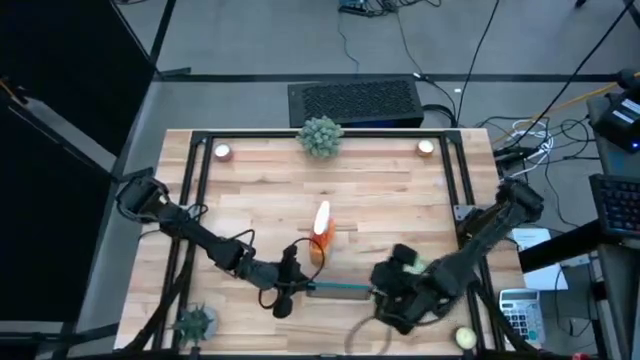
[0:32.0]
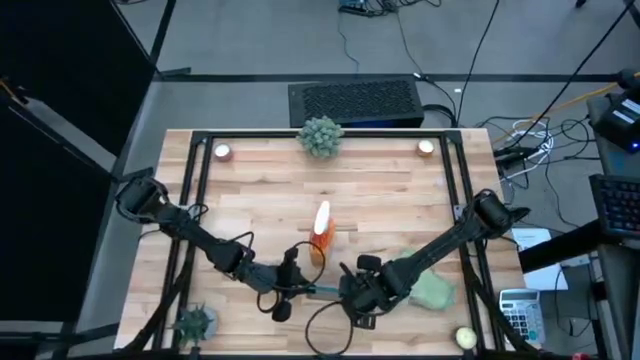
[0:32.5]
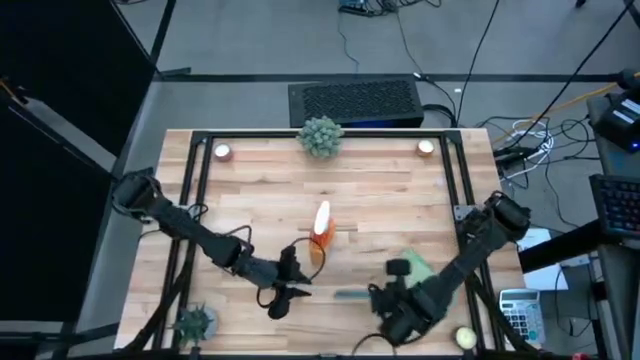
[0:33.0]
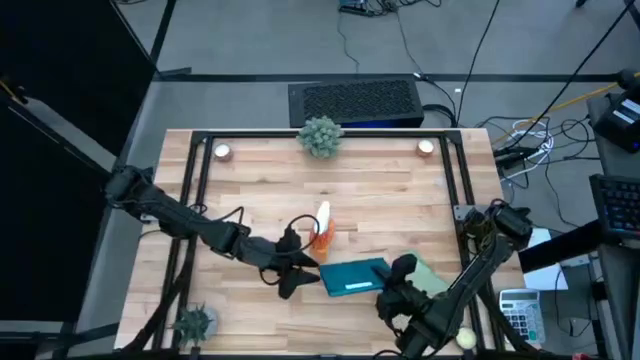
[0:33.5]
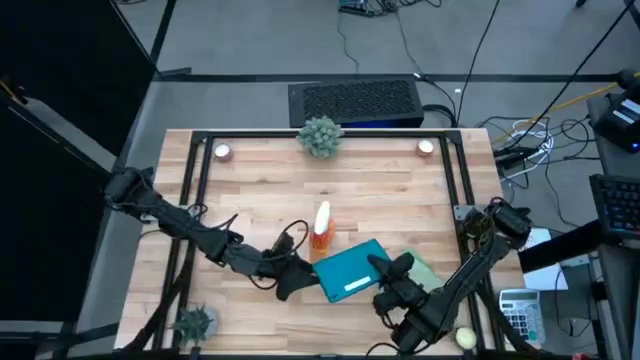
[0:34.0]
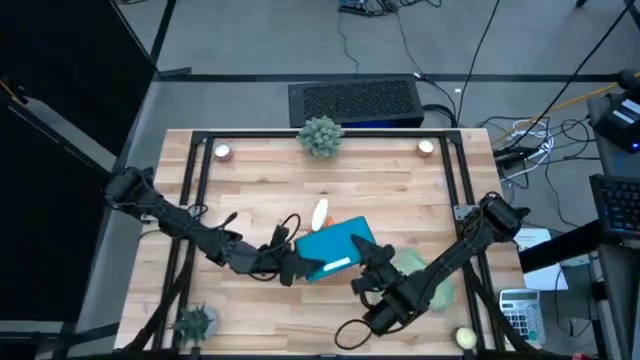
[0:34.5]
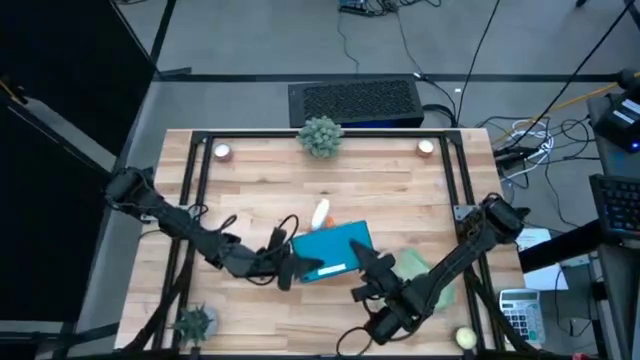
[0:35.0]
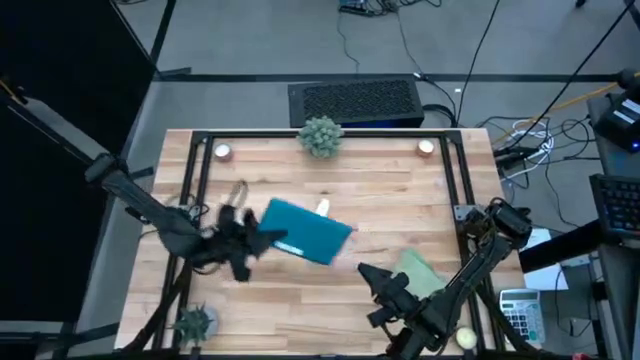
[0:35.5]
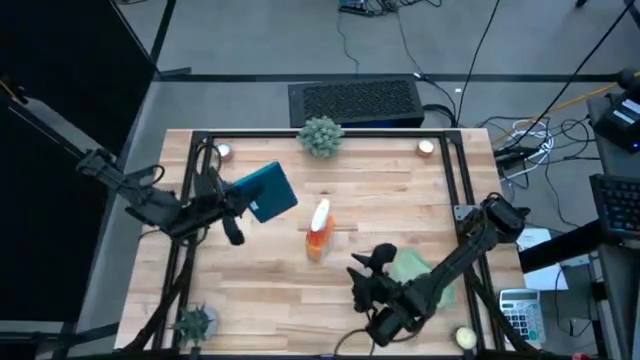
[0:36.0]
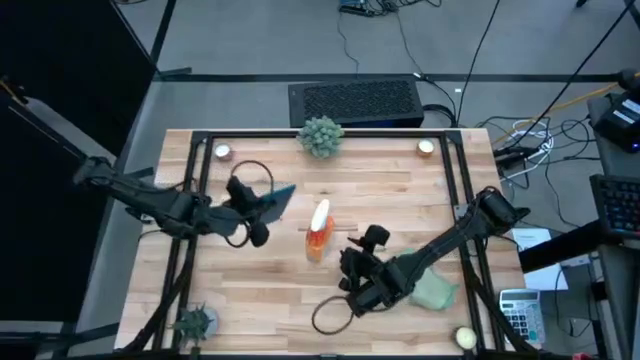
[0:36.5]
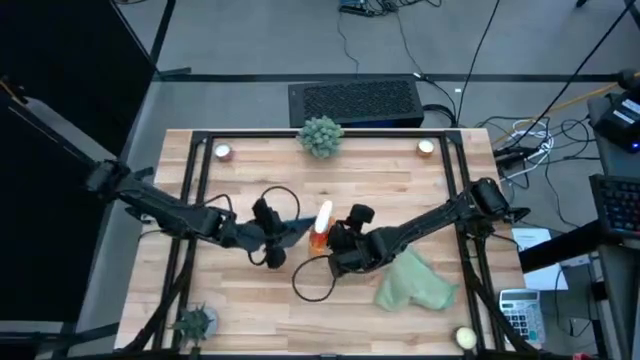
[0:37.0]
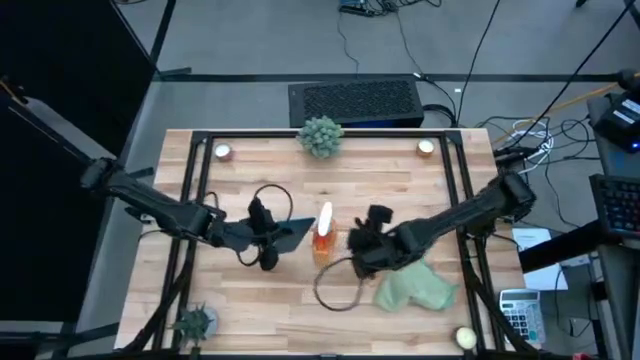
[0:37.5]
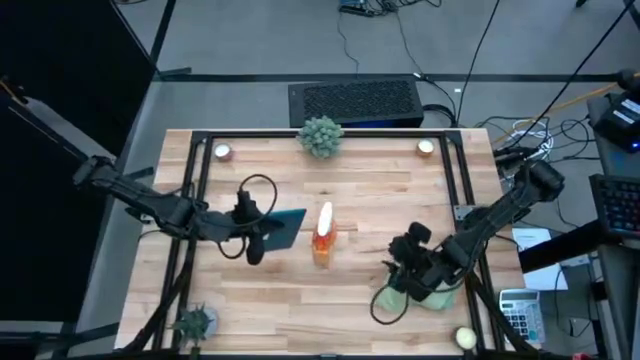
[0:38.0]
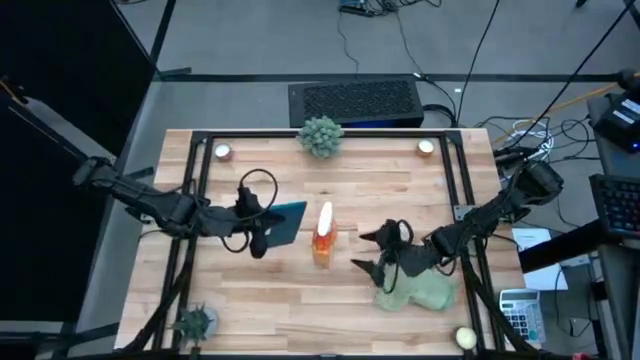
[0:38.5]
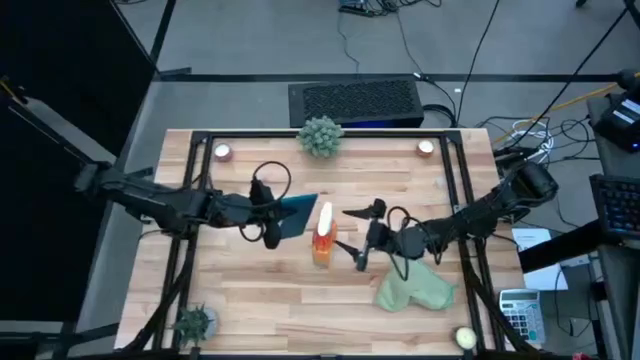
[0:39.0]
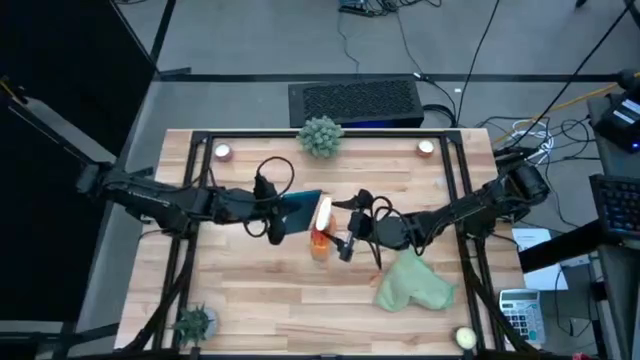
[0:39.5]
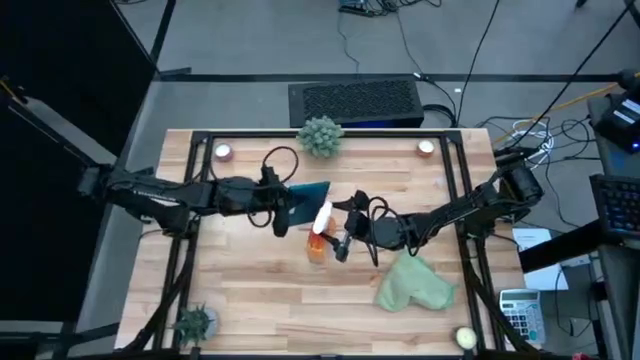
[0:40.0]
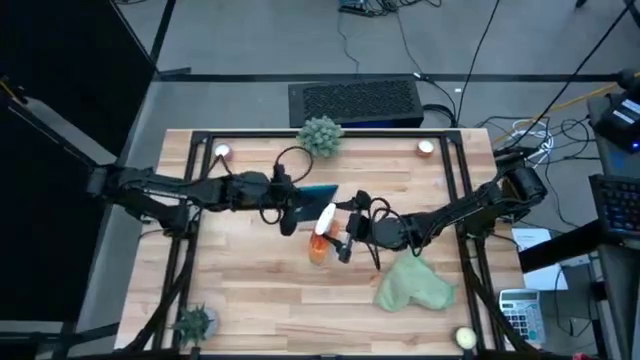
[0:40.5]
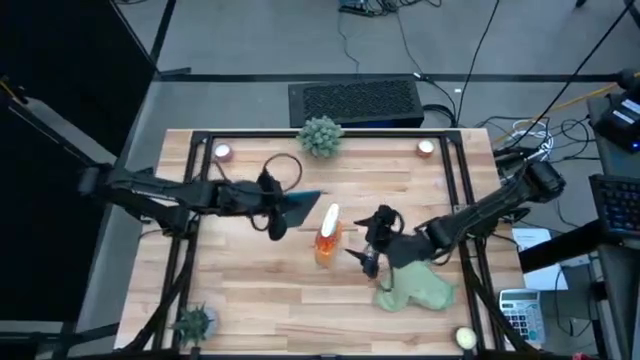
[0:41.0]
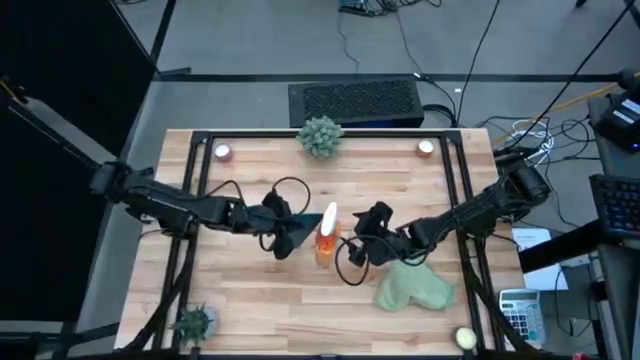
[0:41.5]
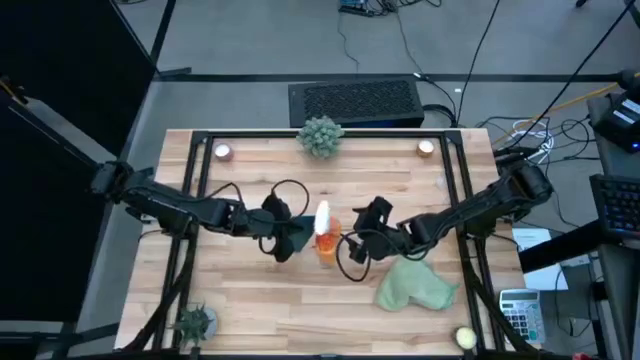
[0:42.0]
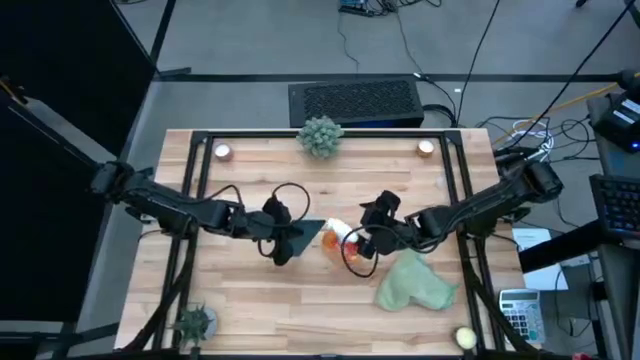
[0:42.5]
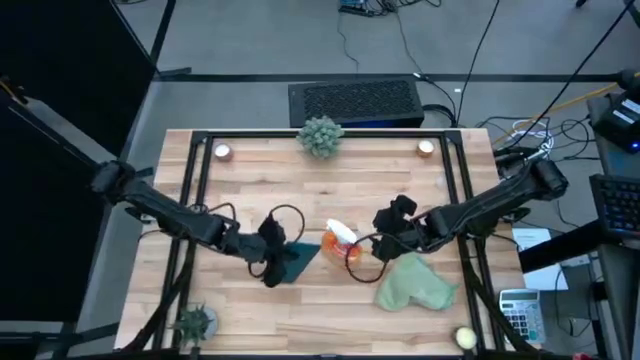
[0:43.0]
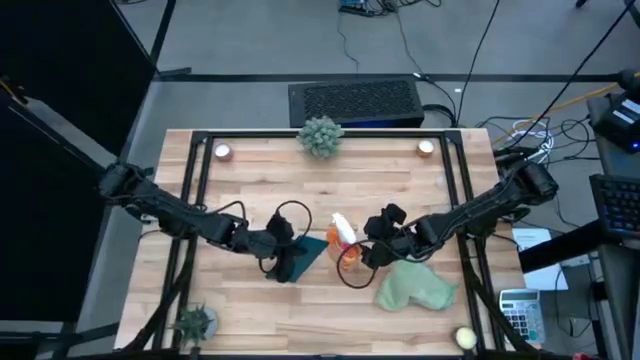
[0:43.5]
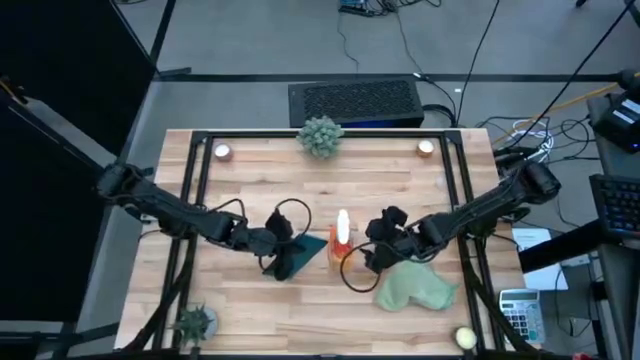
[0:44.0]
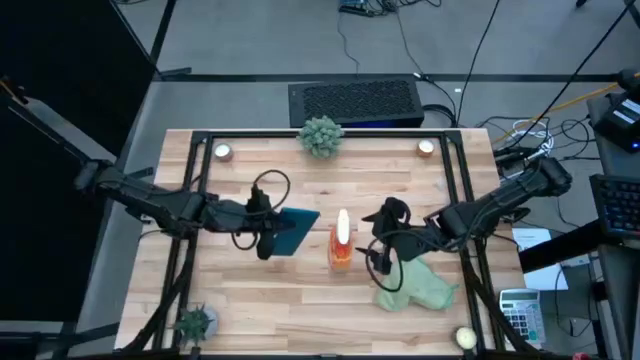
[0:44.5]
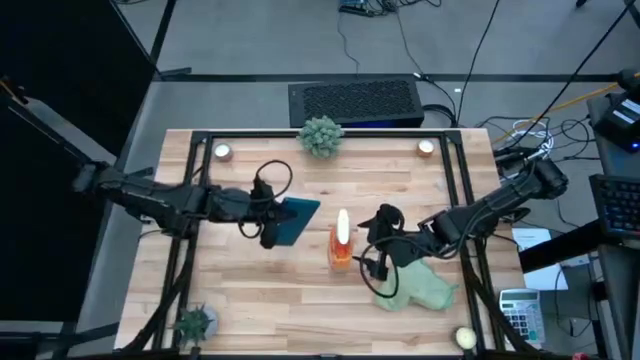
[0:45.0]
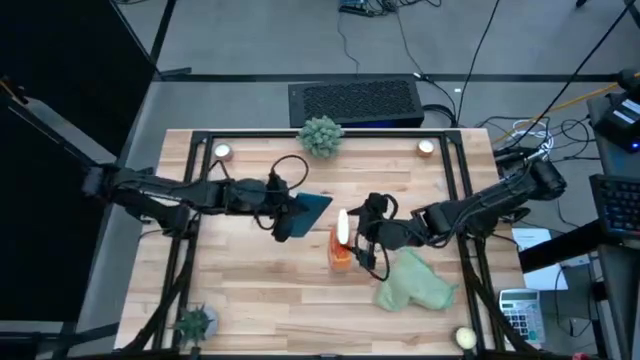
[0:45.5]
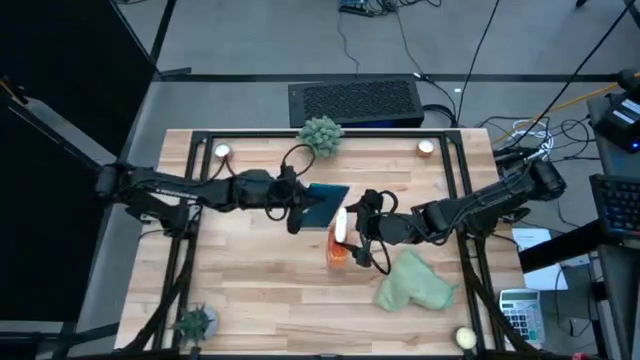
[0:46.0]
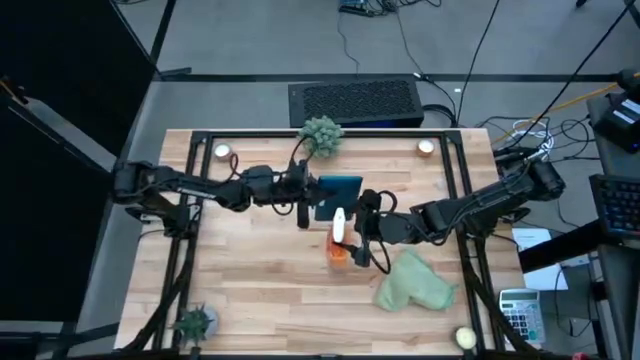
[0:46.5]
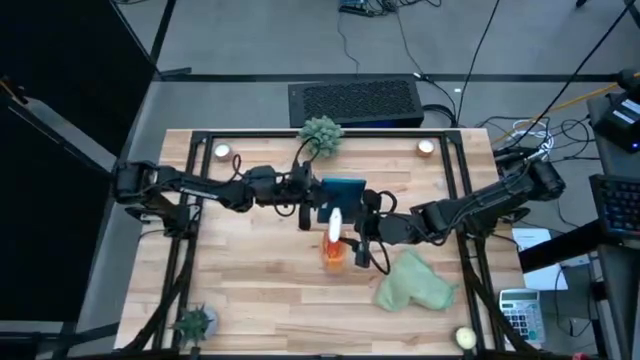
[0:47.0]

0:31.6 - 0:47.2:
Task: Apply microfiber cloth
Spray the back of the tablet

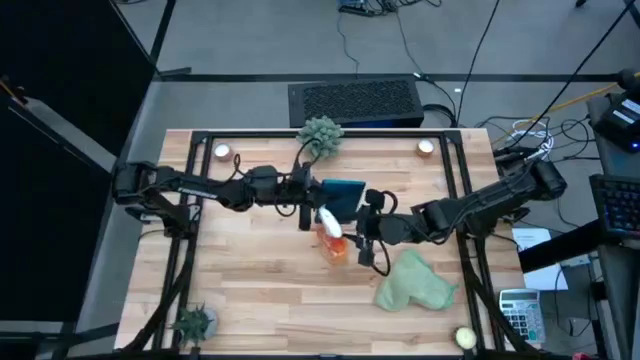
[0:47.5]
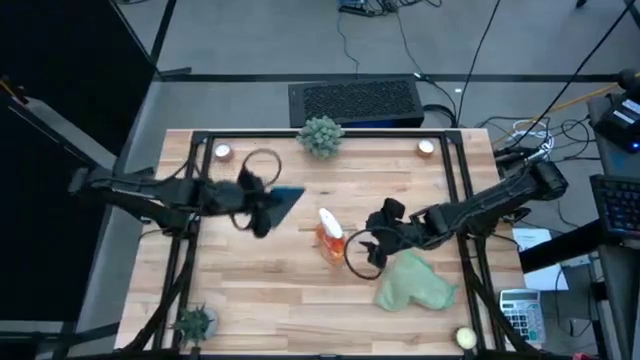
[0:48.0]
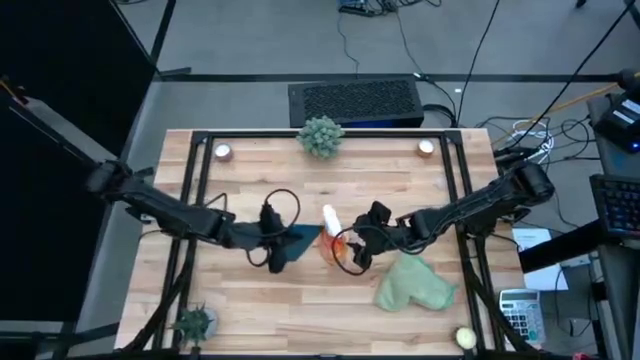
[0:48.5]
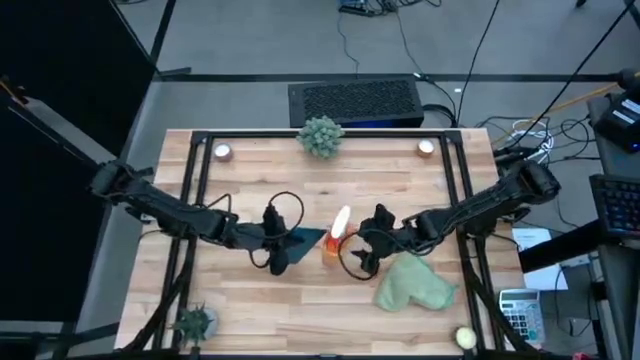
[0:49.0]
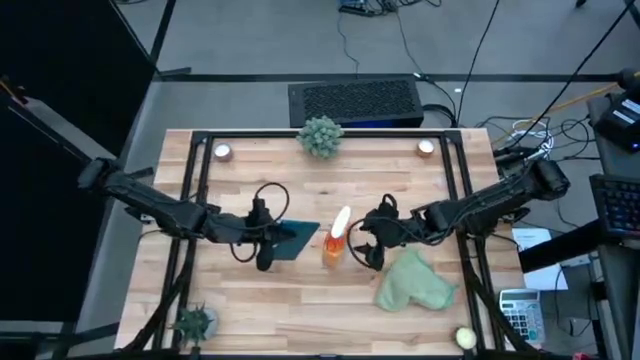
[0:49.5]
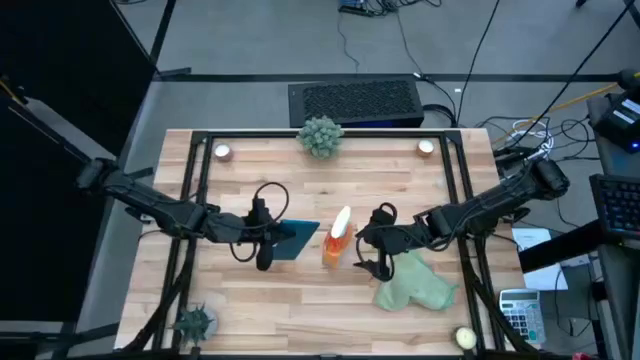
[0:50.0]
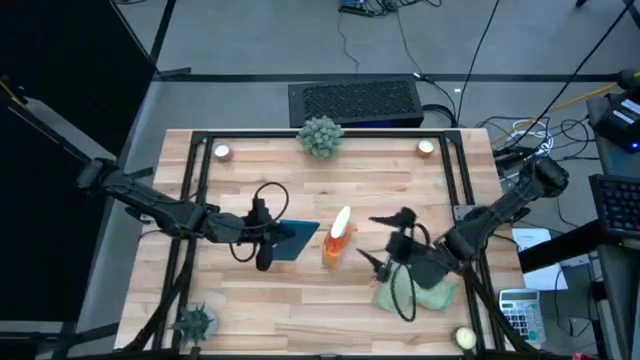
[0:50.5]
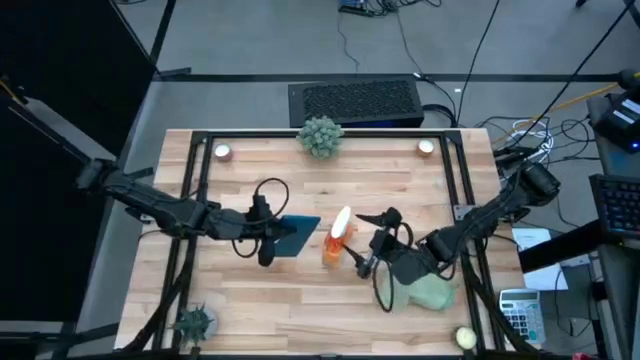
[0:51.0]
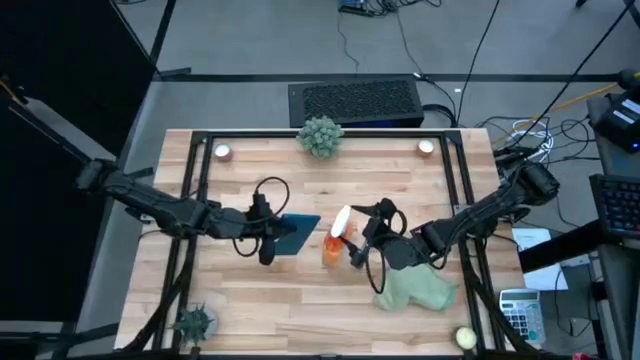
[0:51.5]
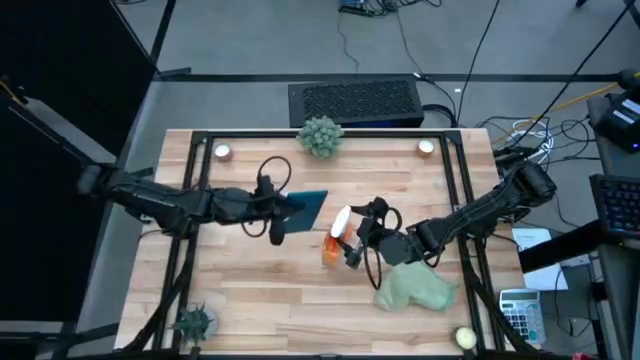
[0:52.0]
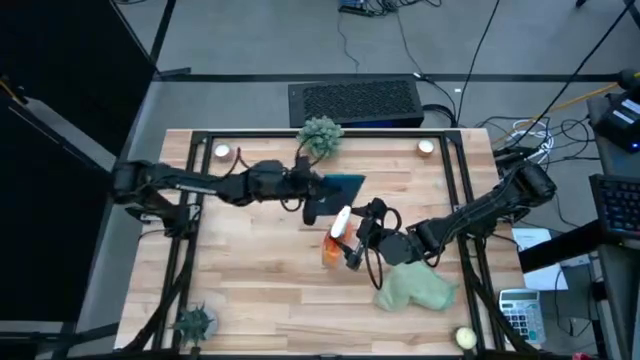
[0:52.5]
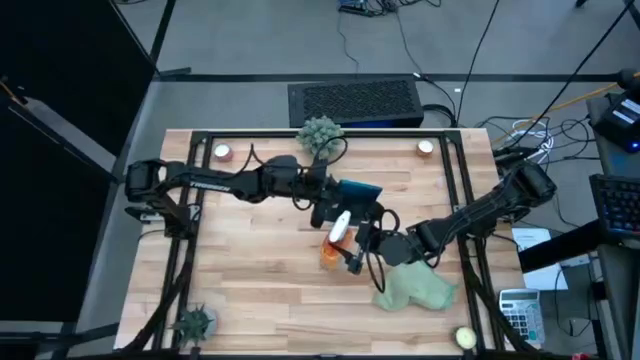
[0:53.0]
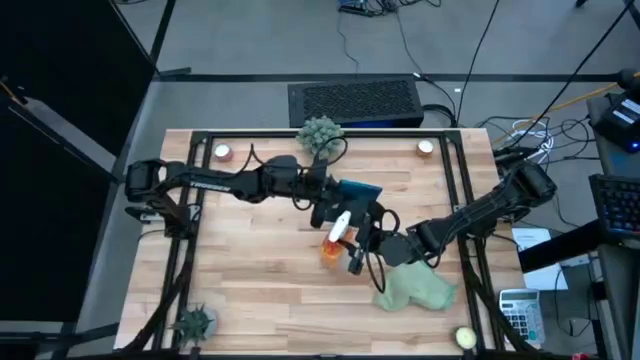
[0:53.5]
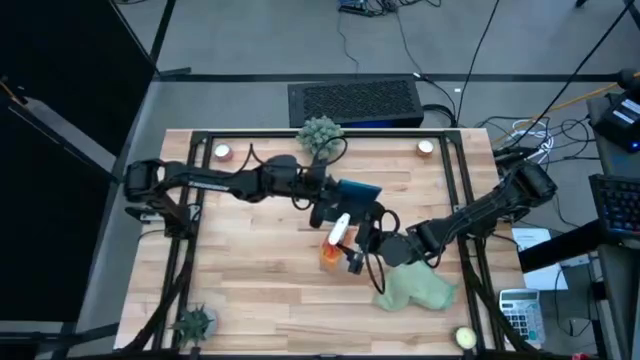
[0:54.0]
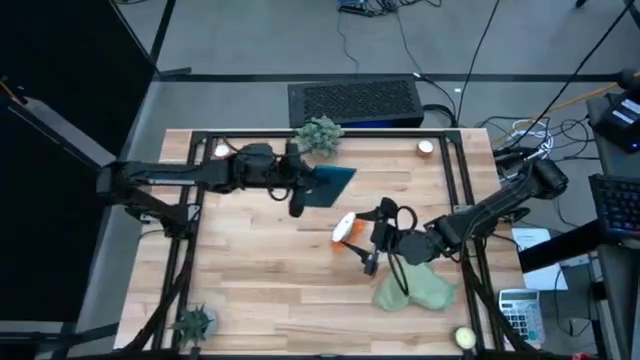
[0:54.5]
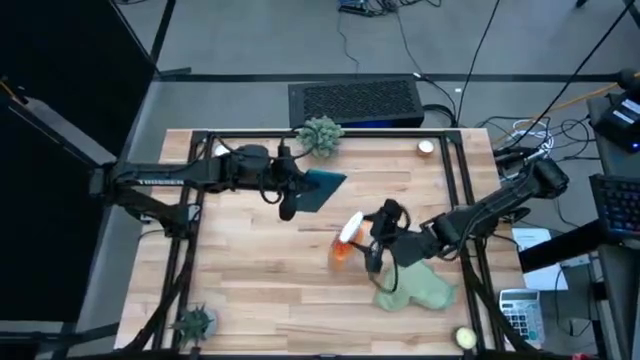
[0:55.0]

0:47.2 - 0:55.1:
Spray the back of the tablet
